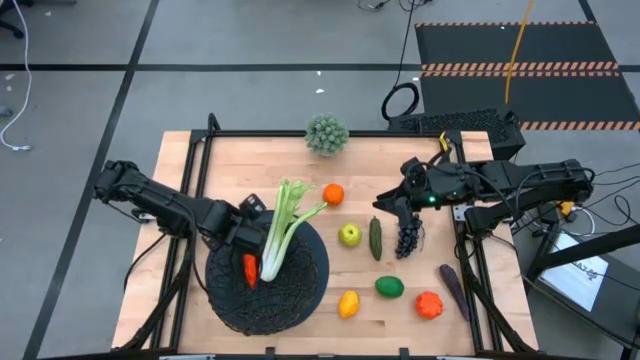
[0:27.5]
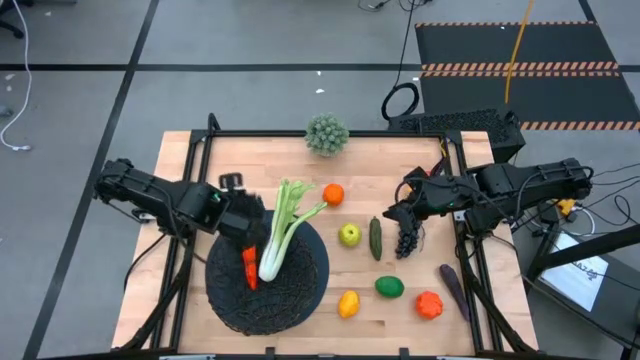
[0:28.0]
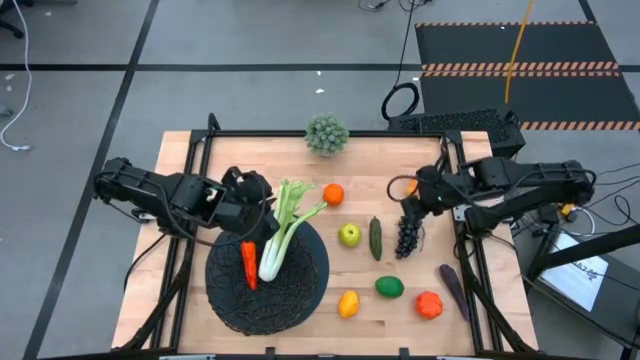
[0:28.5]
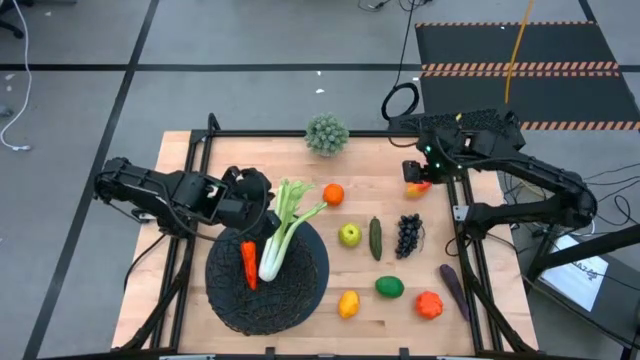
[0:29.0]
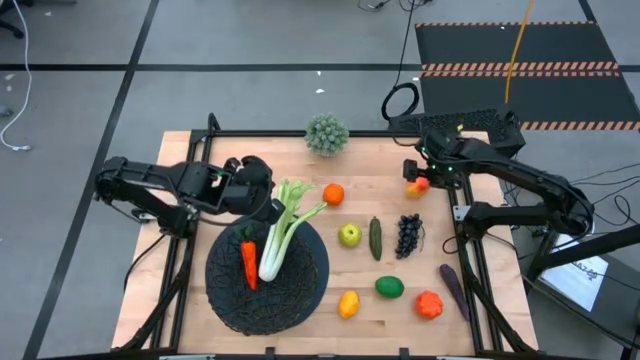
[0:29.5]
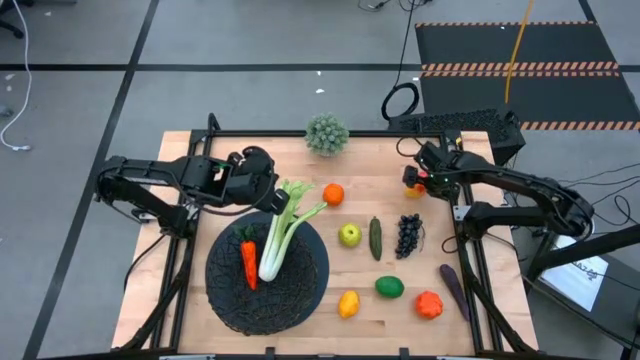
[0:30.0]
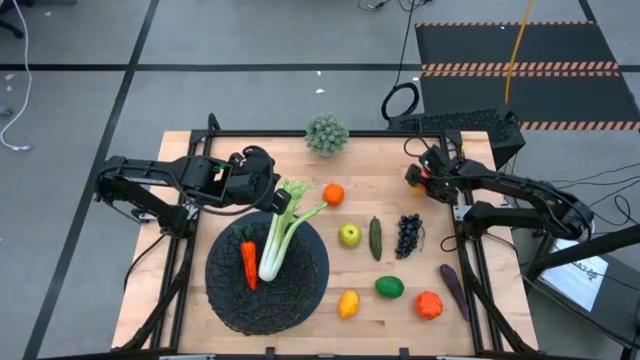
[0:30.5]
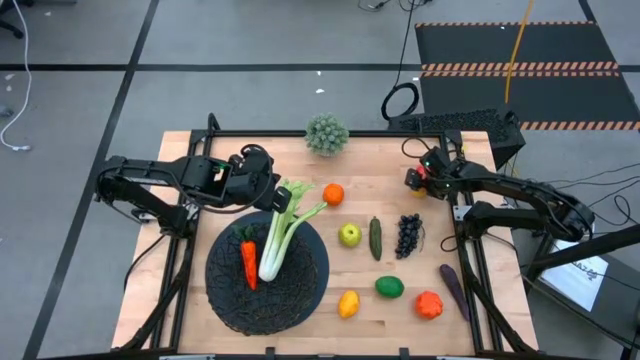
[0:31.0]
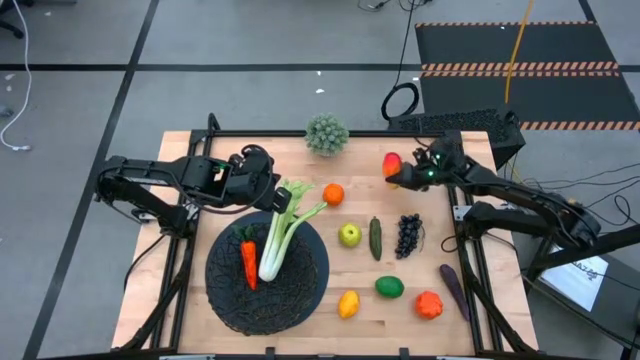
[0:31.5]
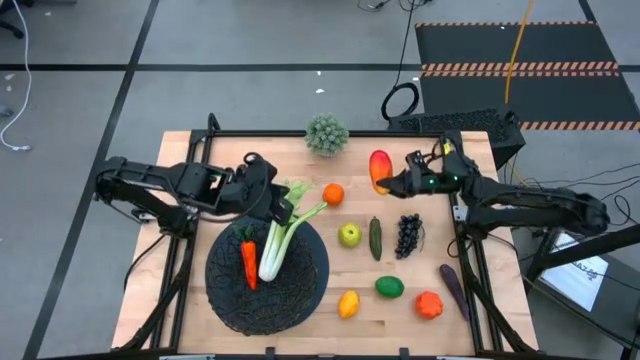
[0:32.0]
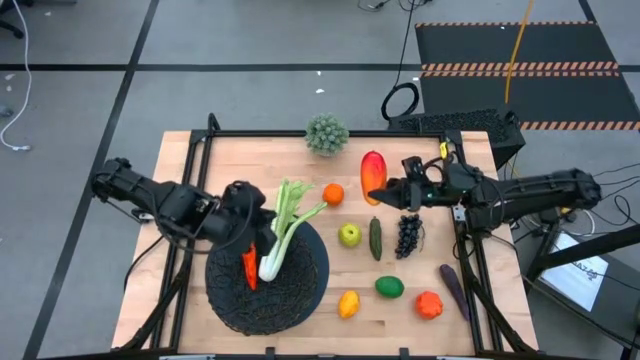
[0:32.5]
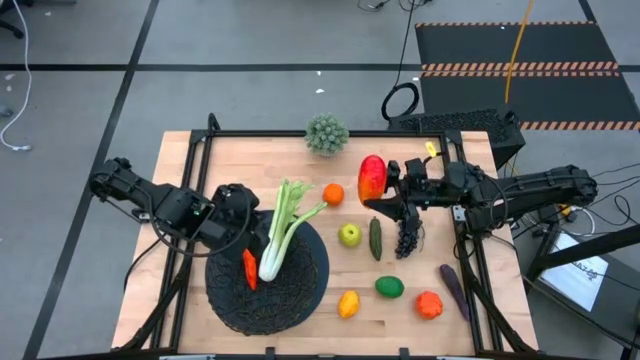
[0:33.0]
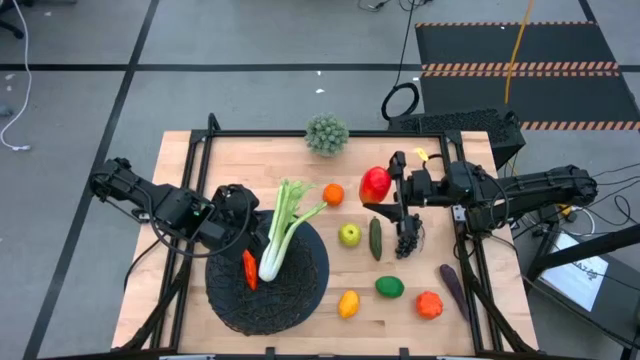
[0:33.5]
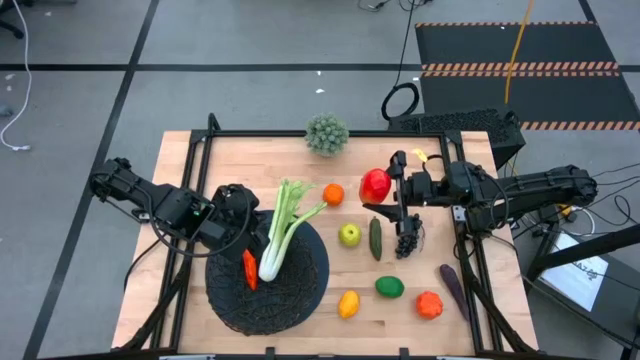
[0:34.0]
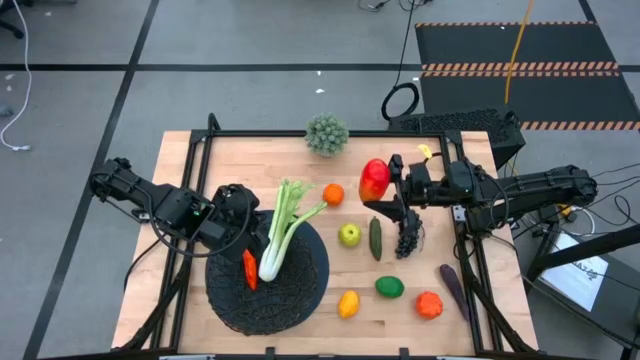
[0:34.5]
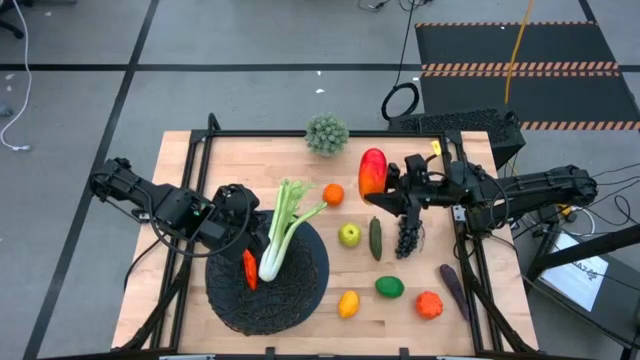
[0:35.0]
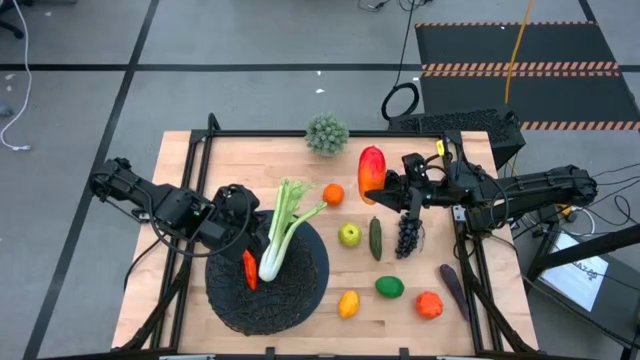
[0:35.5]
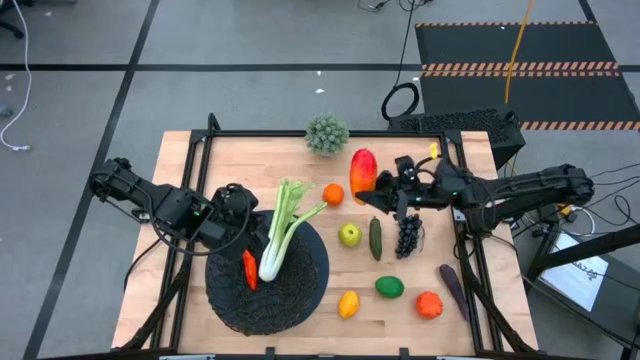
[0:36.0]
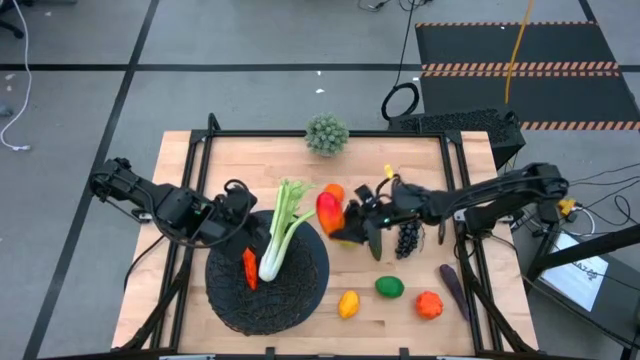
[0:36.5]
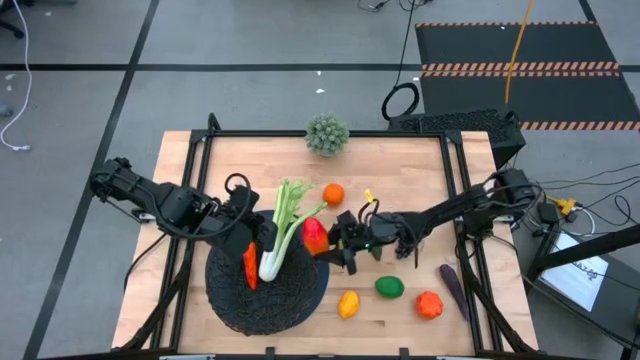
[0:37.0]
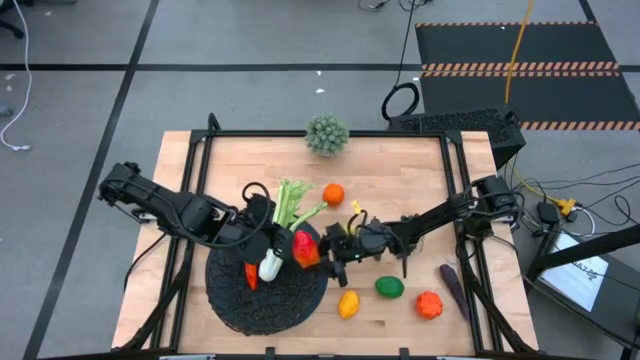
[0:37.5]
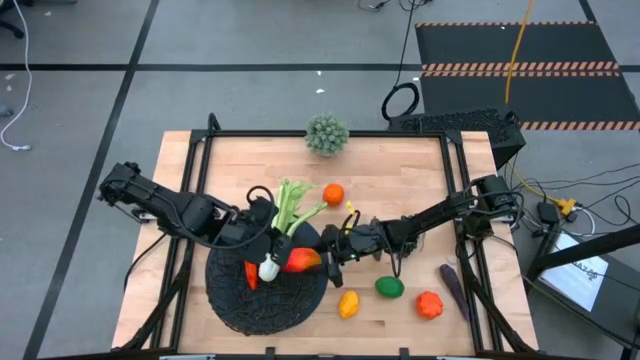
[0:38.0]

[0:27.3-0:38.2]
Task: Build produce basket
Put the orange mango into the black wire basket

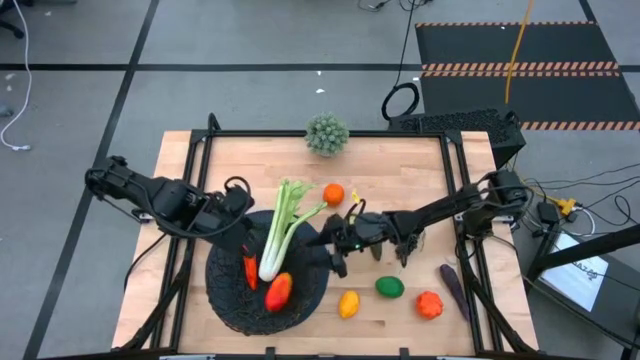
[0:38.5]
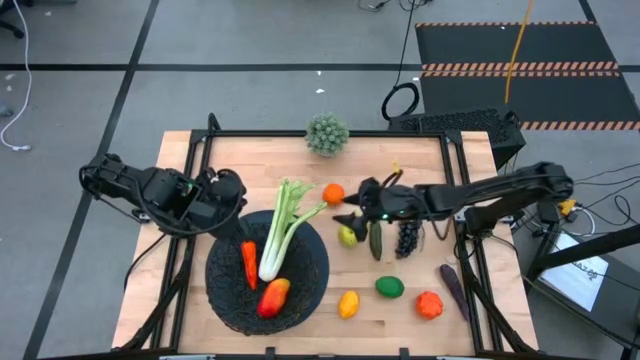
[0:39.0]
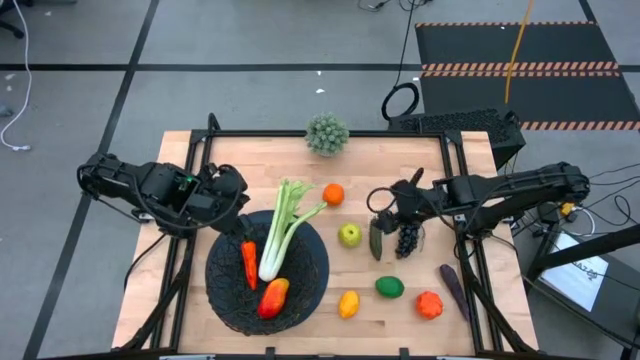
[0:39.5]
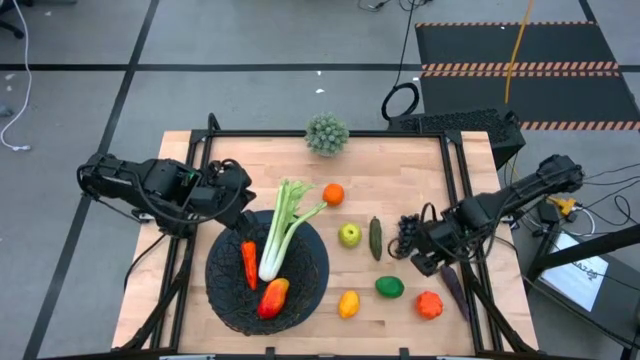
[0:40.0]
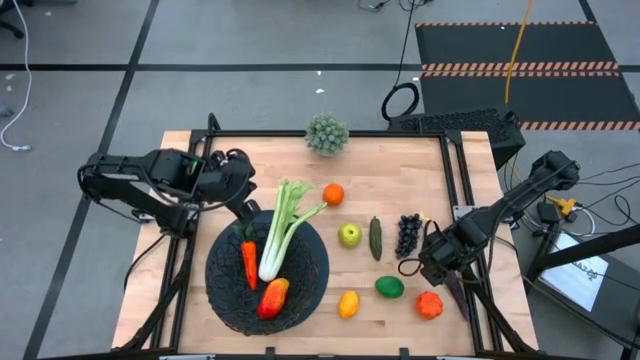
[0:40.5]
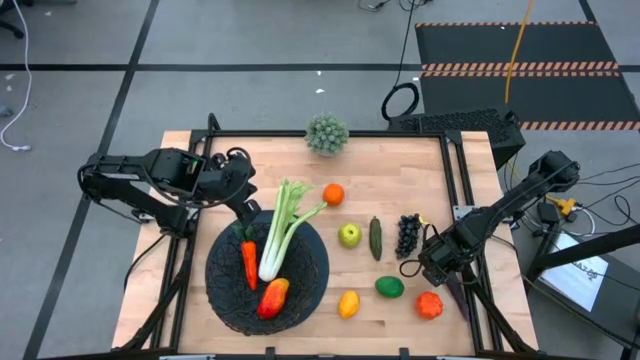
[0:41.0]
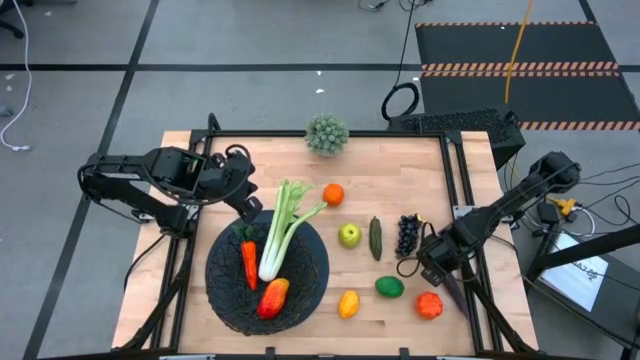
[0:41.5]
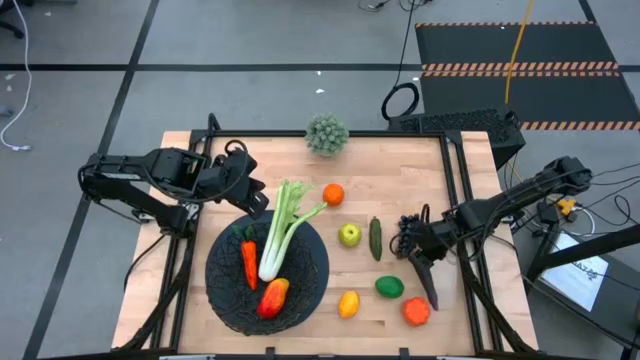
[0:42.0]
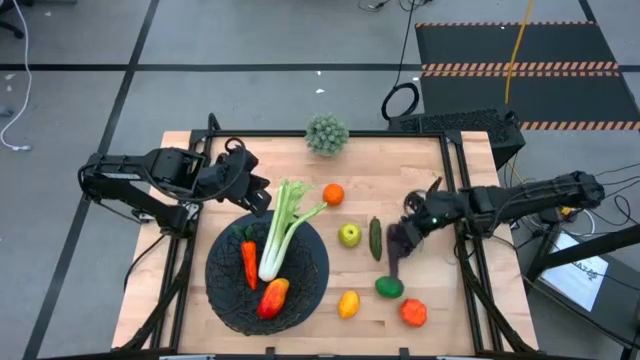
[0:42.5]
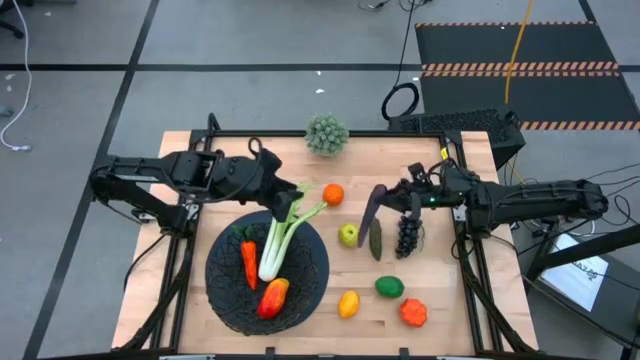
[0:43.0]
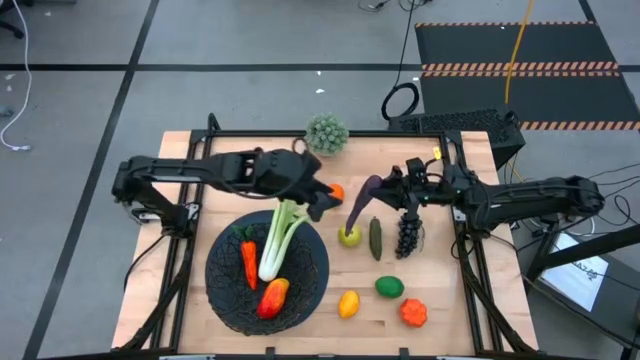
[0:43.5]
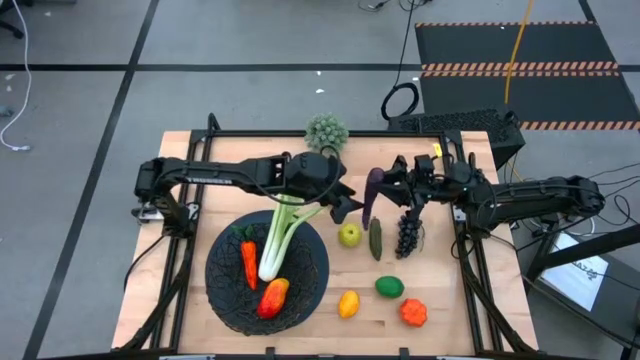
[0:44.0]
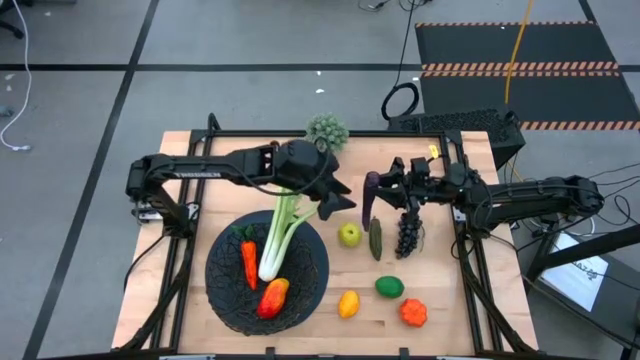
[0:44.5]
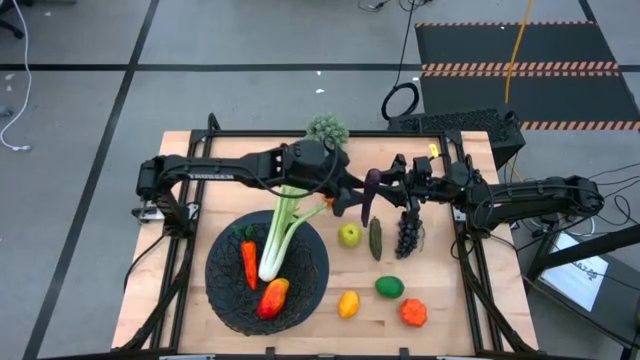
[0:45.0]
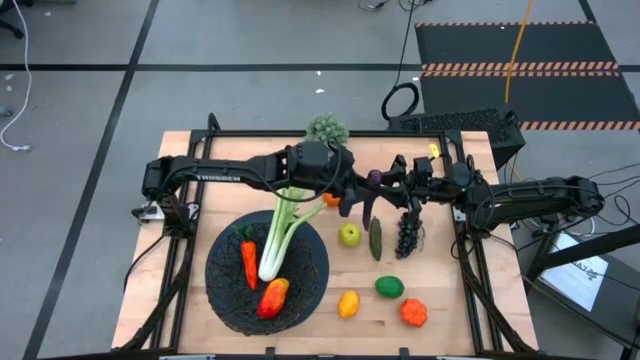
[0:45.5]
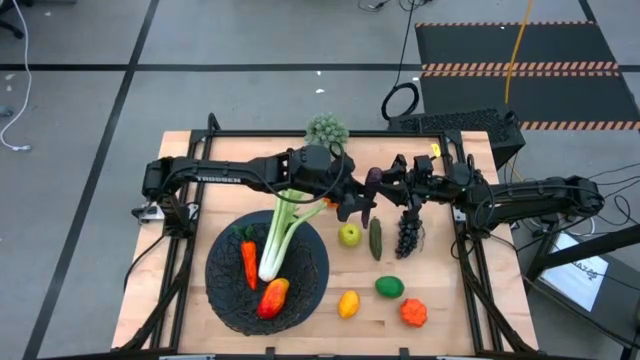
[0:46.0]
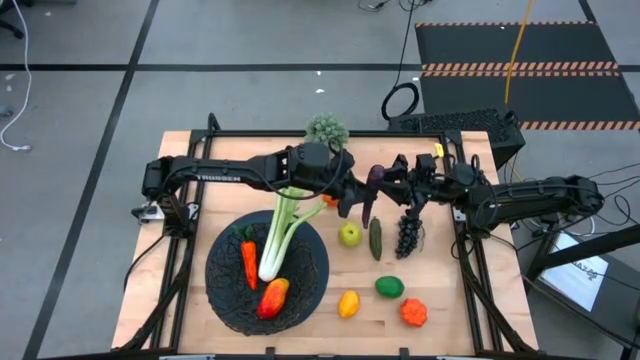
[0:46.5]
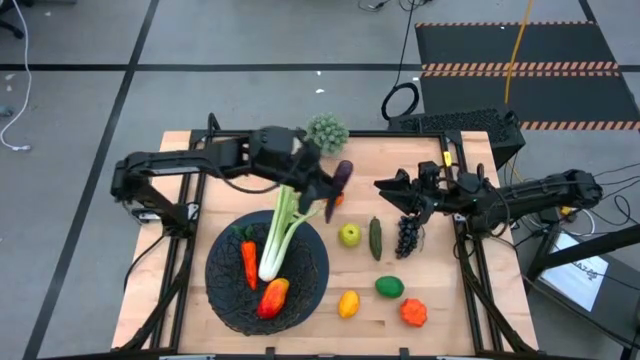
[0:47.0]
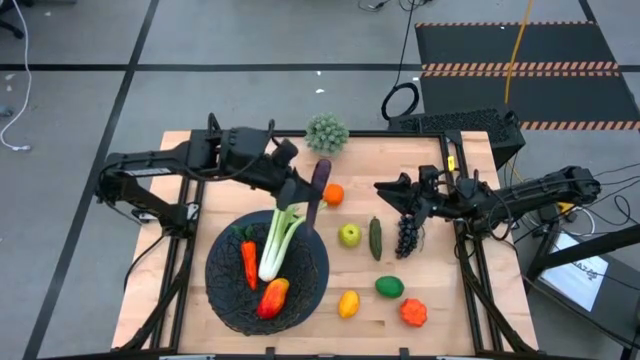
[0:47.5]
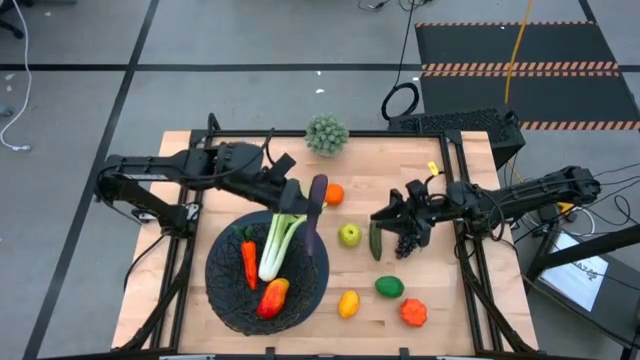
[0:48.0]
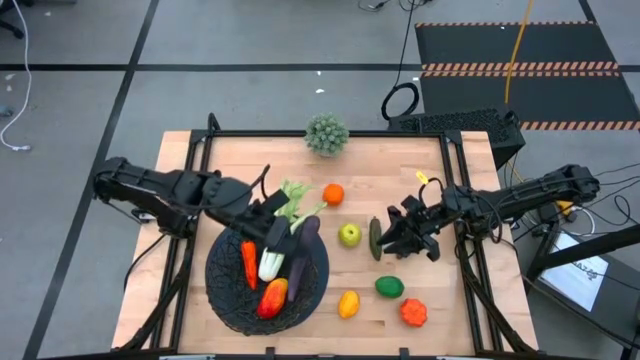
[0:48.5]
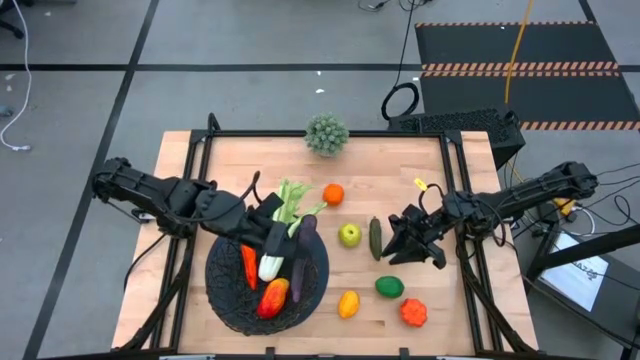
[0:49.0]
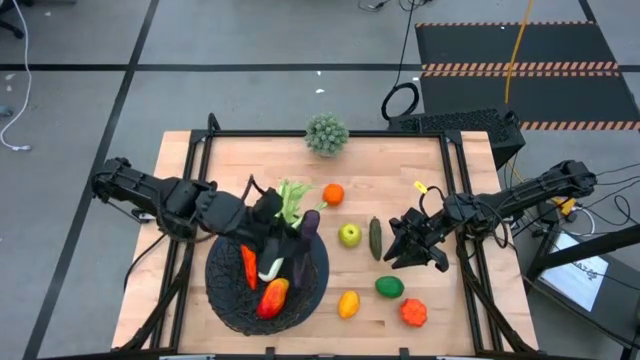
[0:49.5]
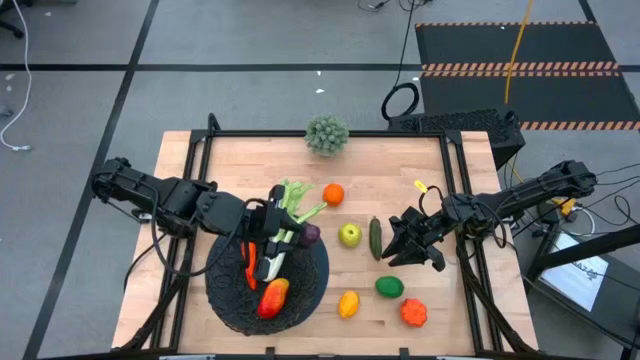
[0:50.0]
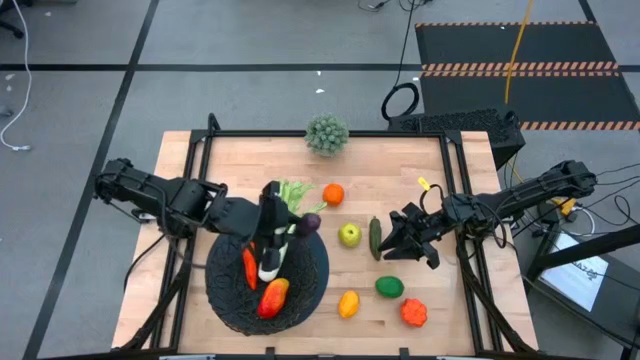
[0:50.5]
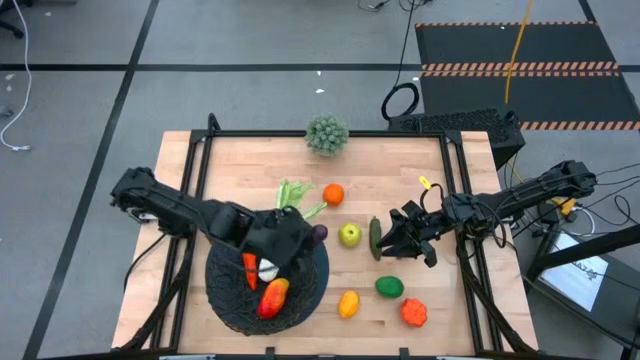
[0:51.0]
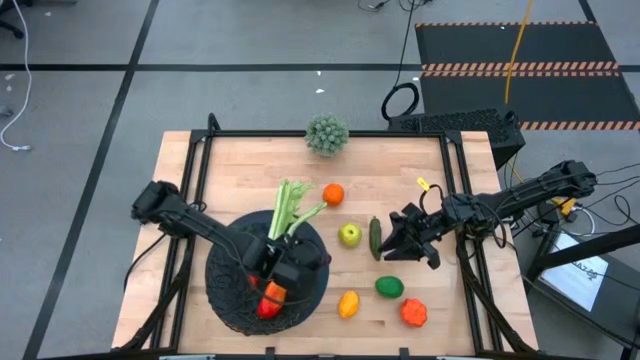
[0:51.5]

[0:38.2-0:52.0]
Put the purple eggplant into the black wire basket
